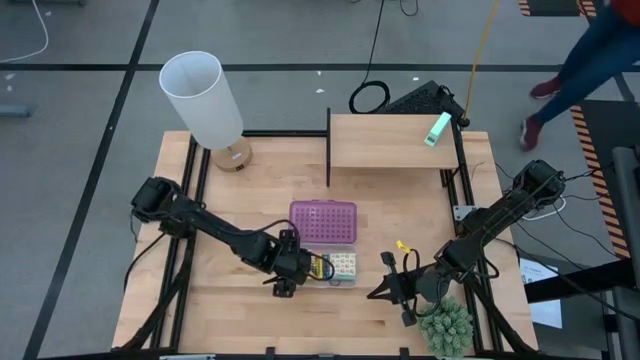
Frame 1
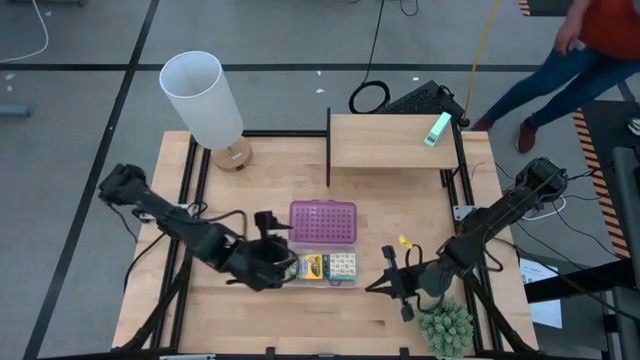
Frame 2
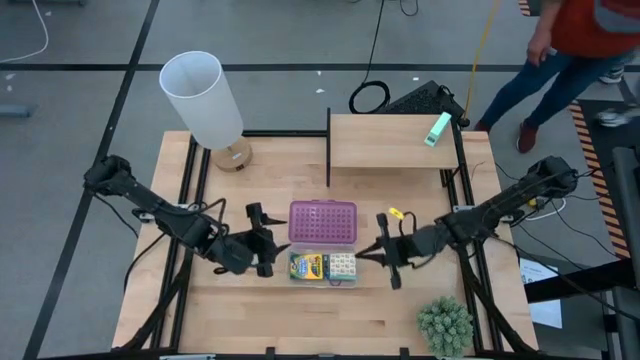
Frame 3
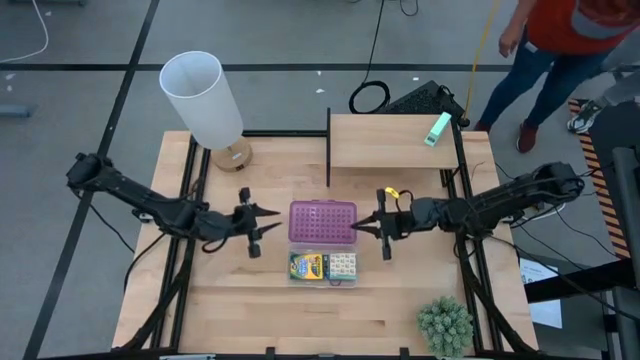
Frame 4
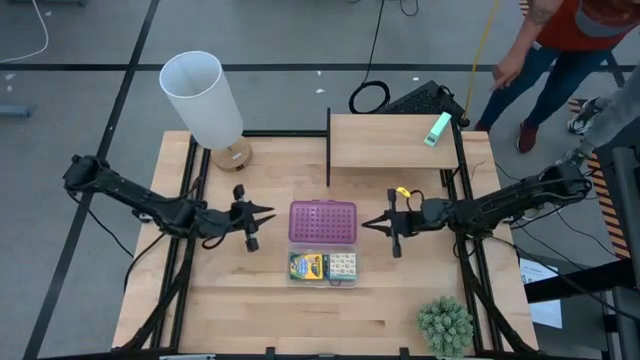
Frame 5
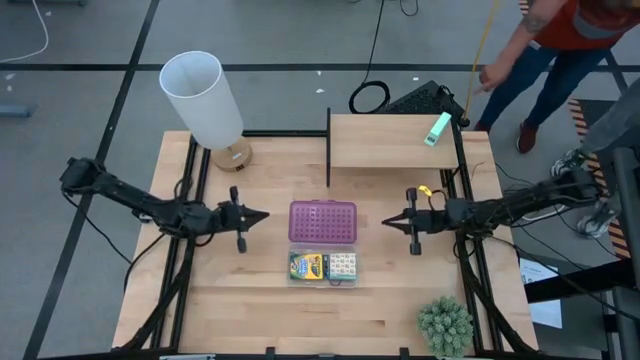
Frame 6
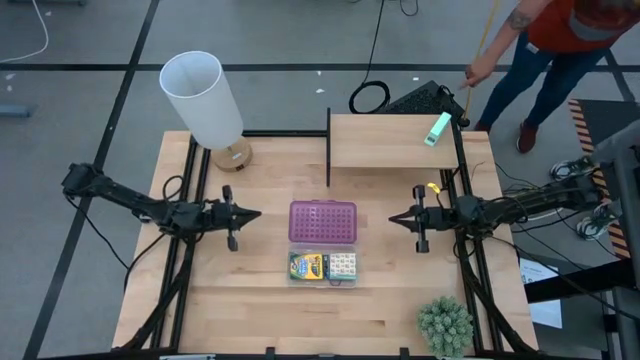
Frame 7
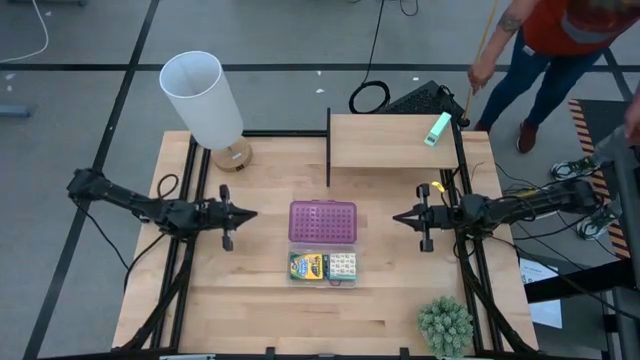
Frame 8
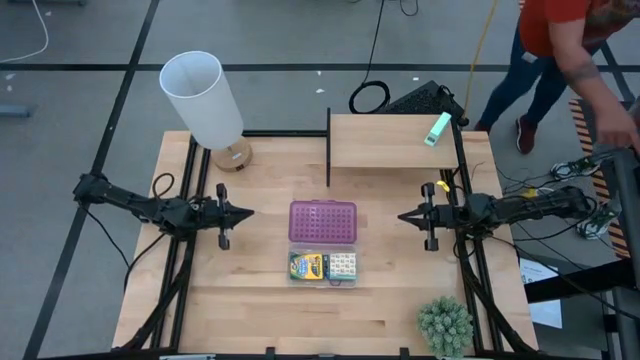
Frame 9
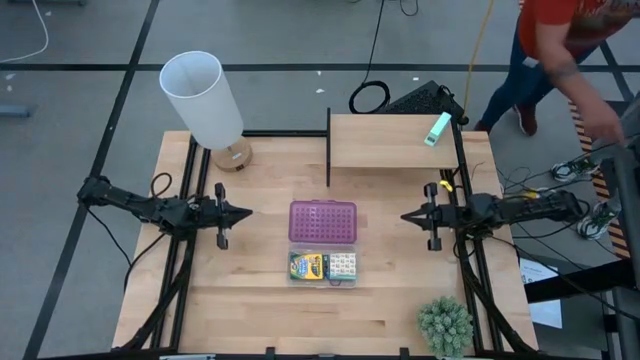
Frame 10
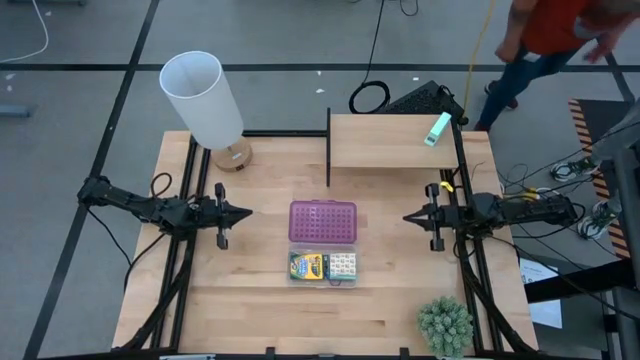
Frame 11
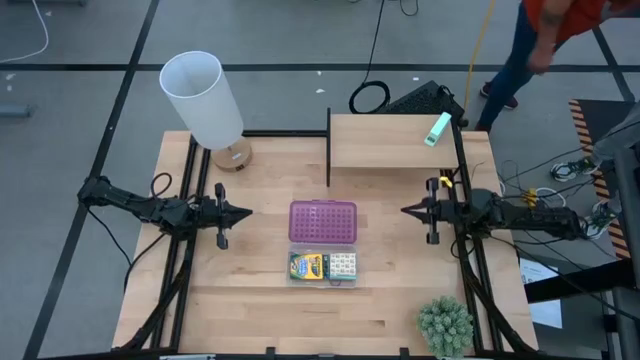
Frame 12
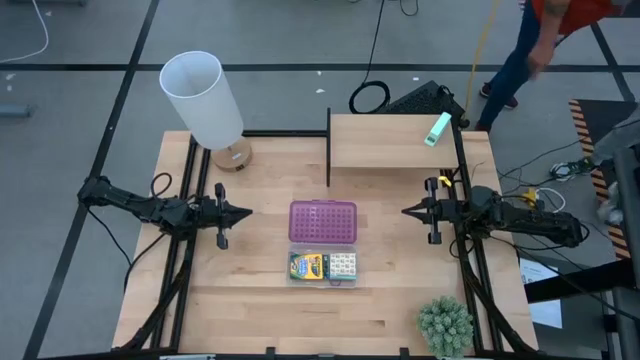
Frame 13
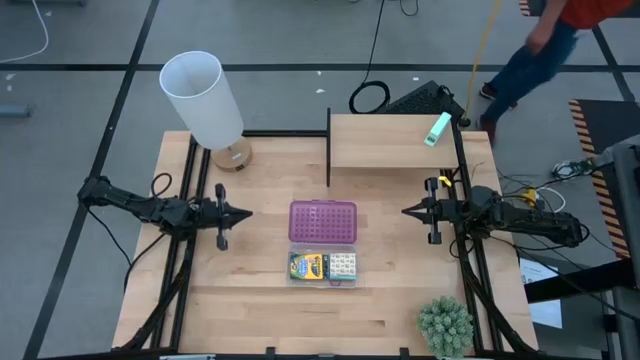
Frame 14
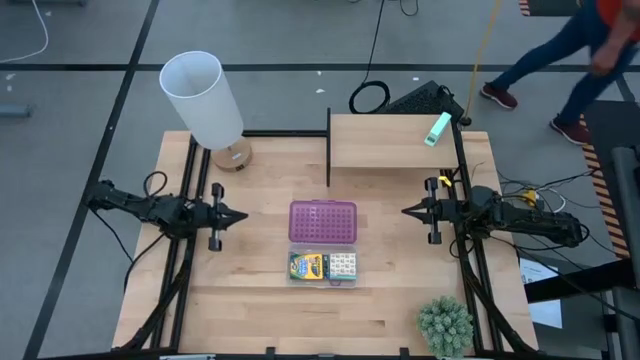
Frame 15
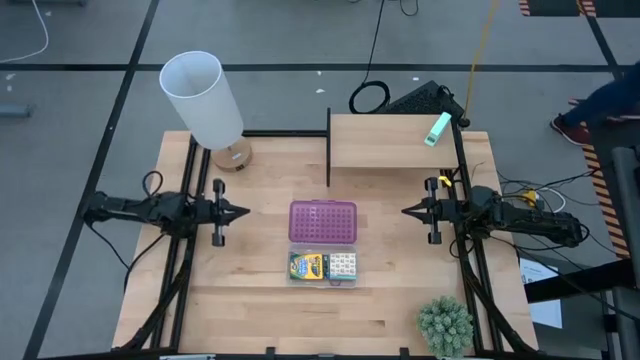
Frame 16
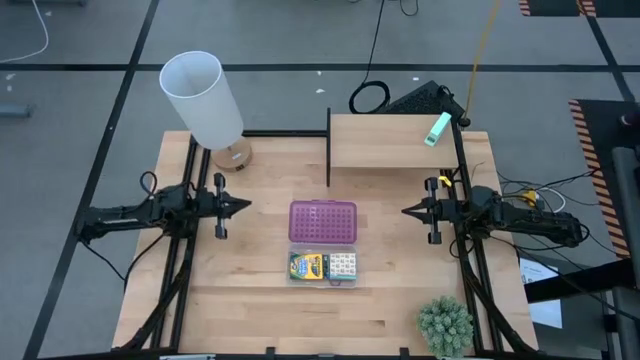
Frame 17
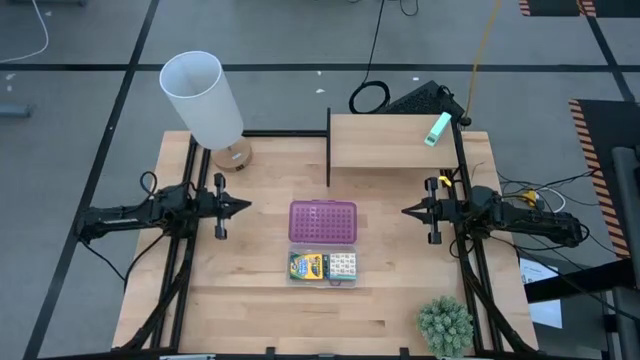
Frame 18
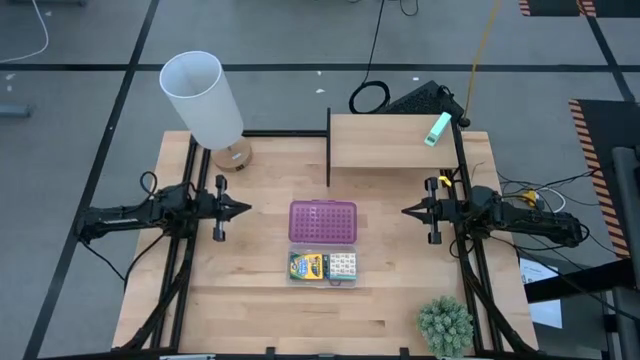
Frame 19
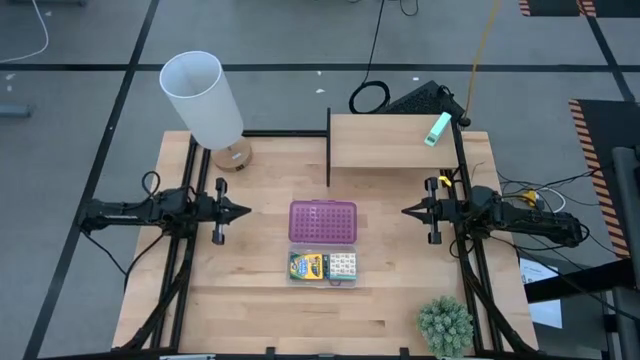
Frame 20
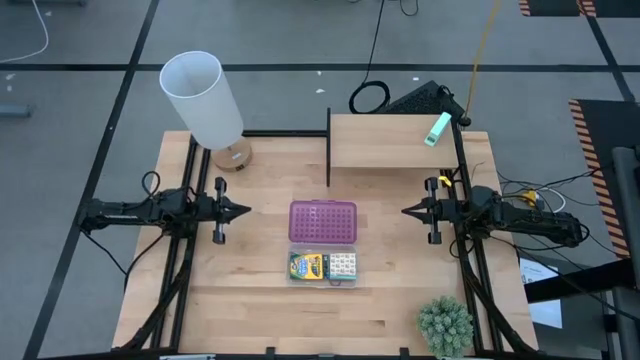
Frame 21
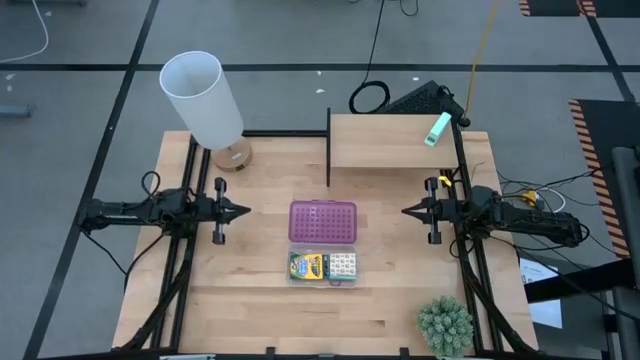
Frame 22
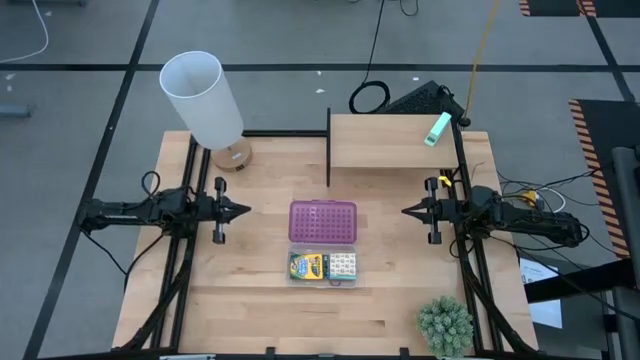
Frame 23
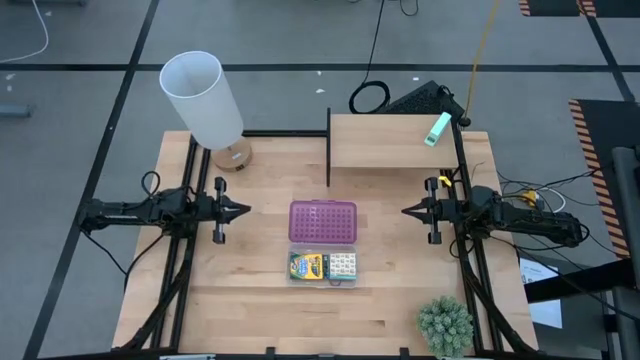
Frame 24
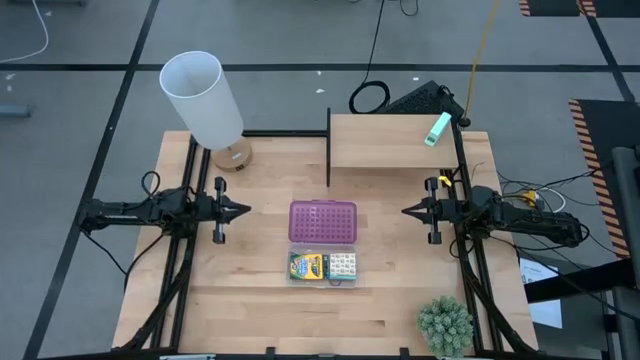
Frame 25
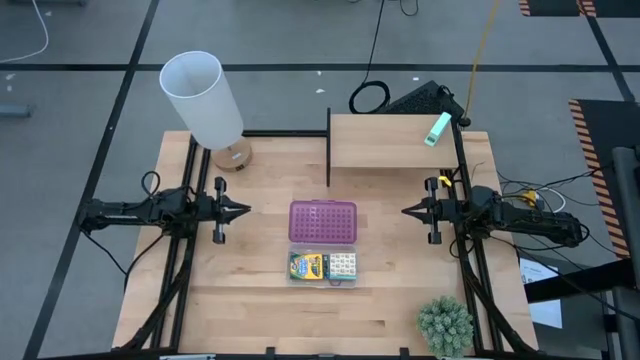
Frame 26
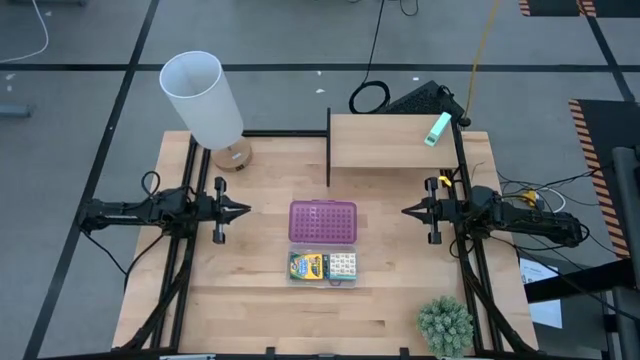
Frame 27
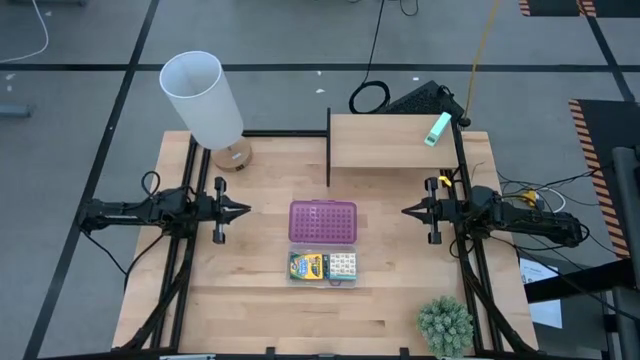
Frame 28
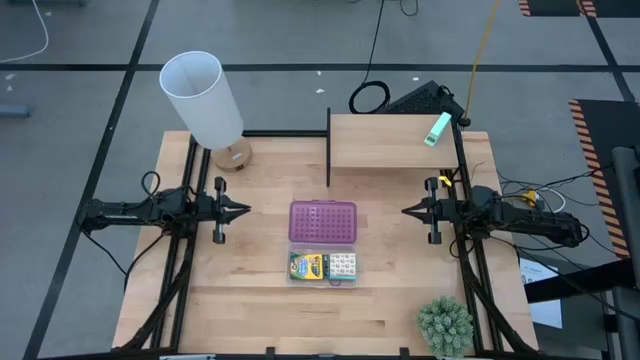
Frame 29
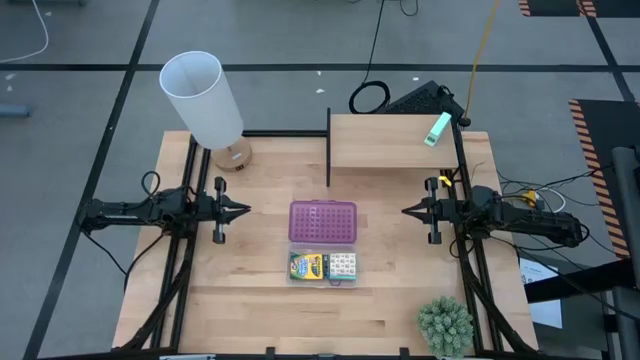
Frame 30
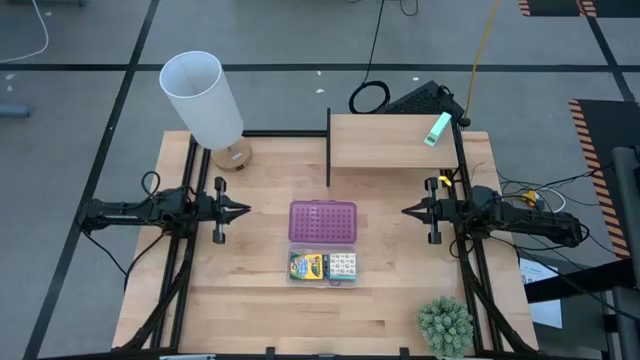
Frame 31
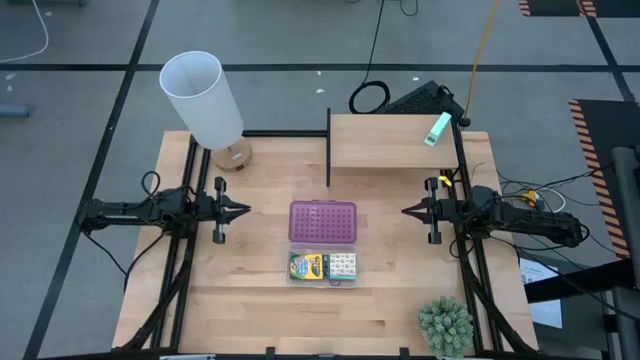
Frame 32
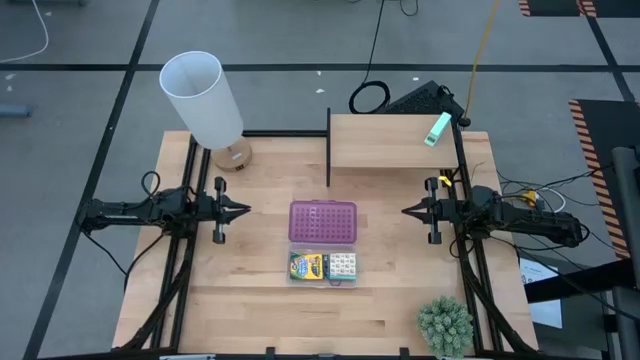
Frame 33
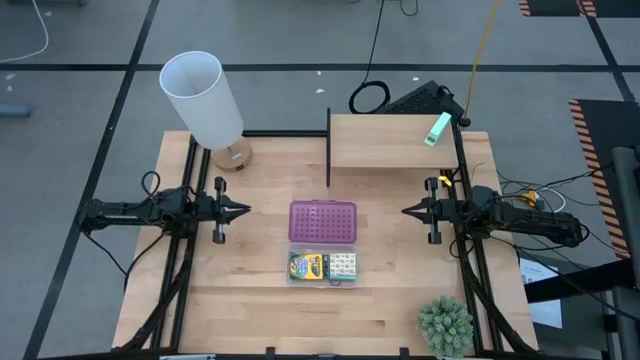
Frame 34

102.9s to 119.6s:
Task: Pack school essentials
Return to Home Position

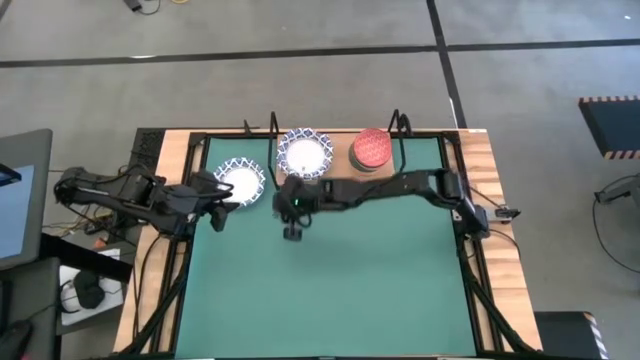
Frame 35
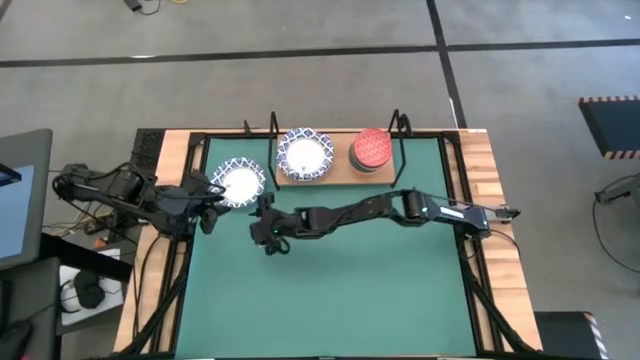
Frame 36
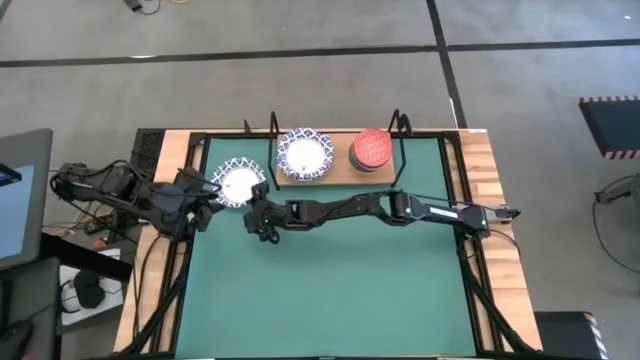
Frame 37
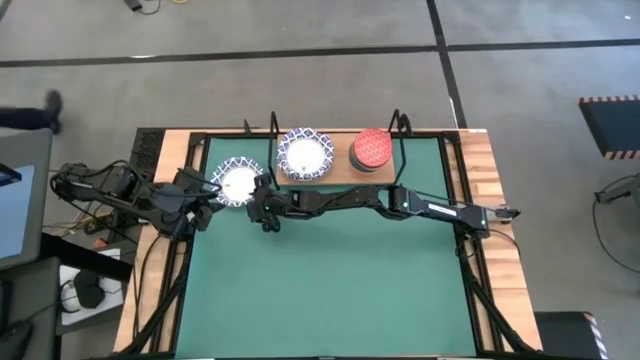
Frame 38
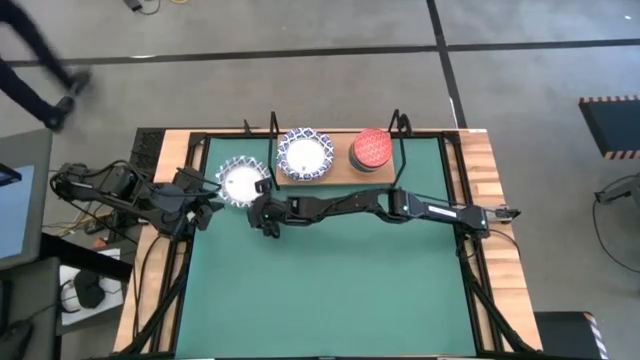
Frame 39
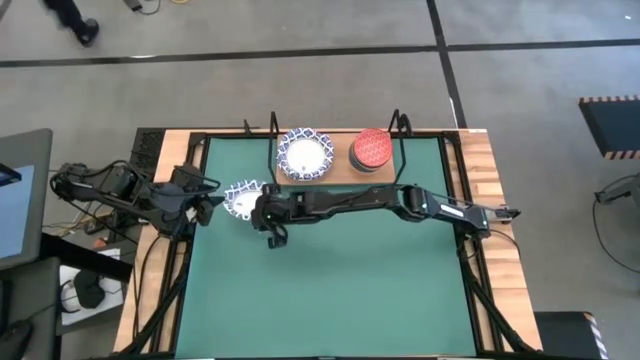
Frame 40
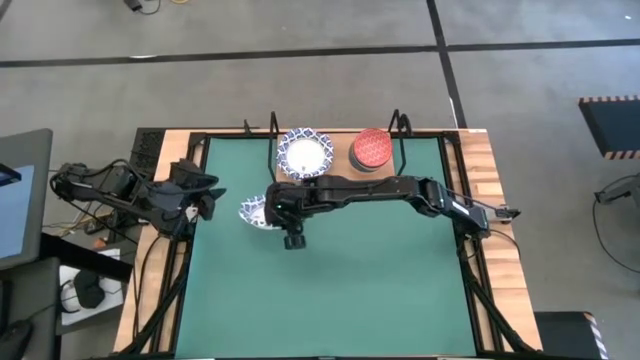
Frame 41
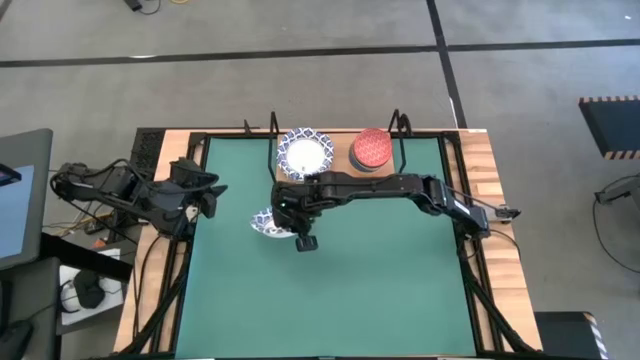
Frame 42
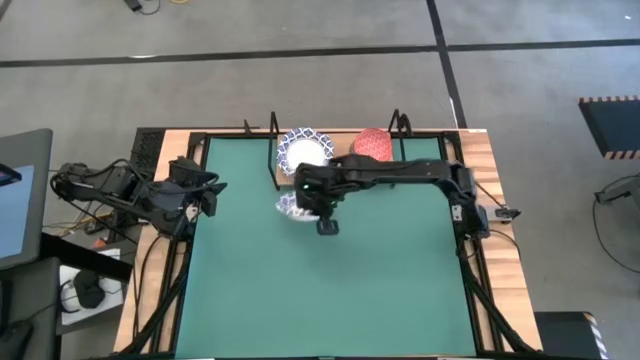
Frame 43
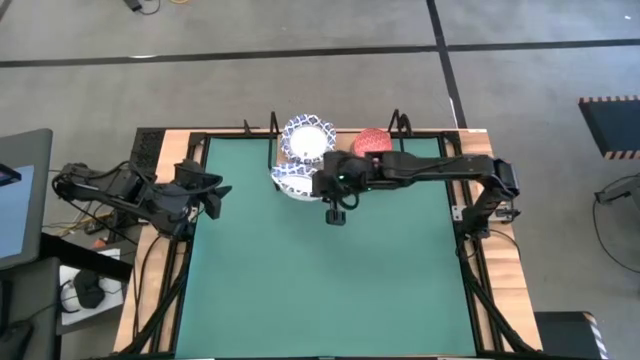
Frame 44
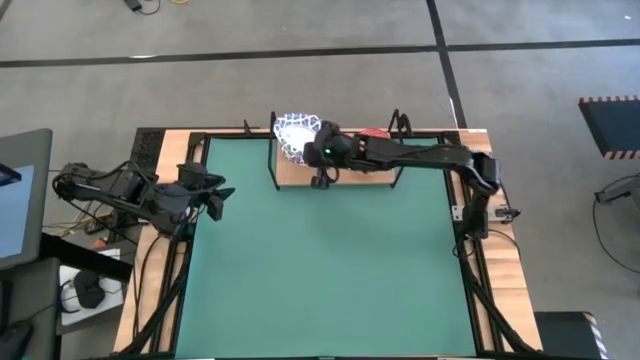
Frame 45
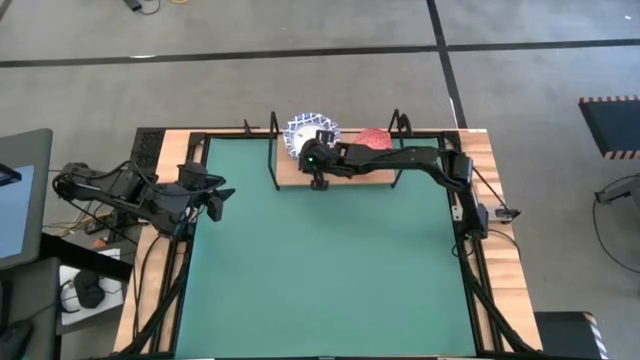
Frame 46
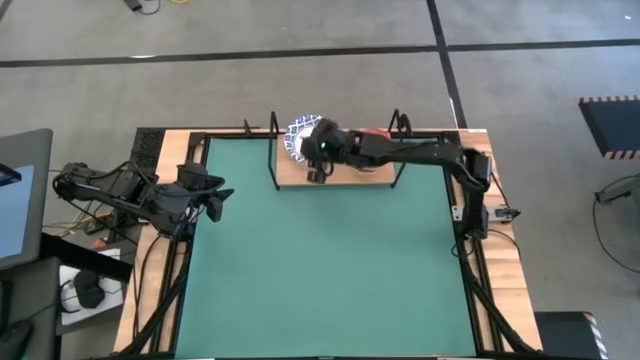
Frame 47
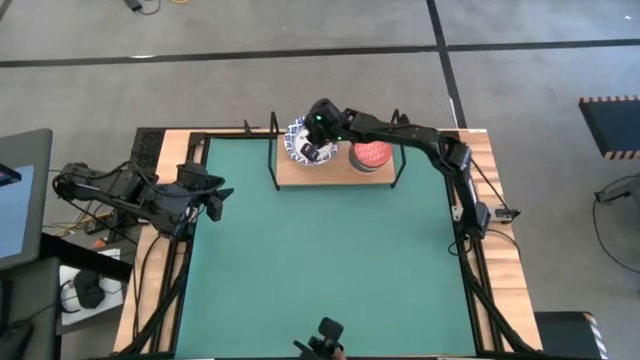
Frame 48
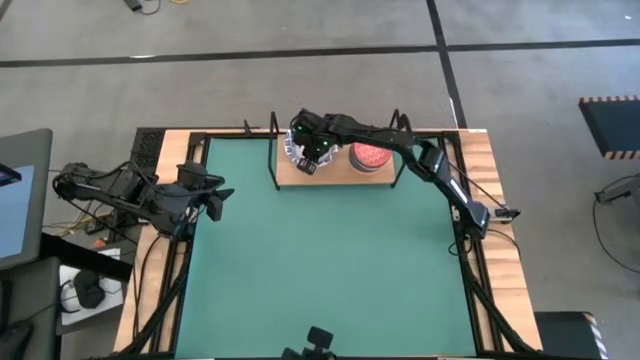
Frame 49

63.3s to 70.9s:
Task: Place and stack bowls onto a shelf
Stack the white and blue paper bowl on top of the white and blue paper bowl on the shelf
